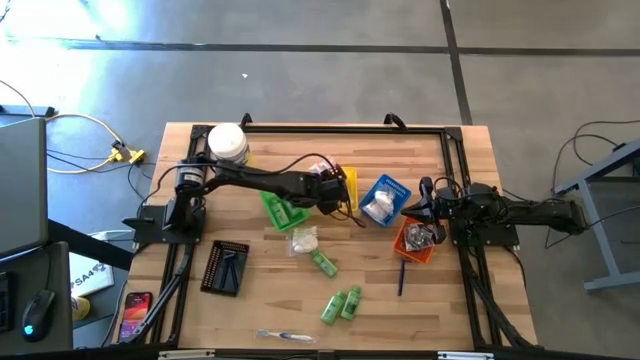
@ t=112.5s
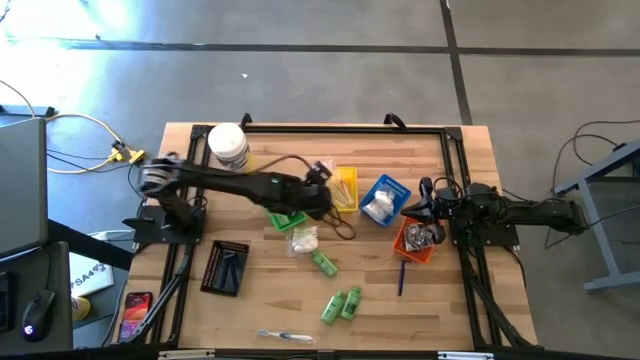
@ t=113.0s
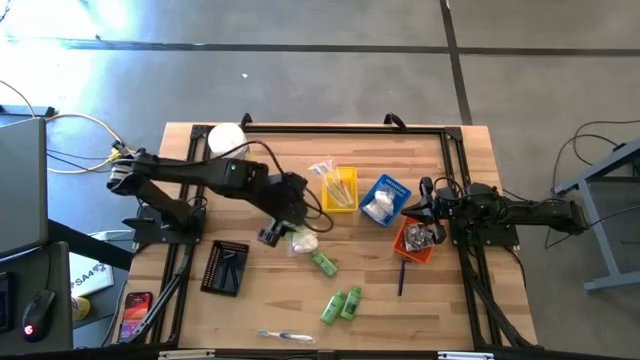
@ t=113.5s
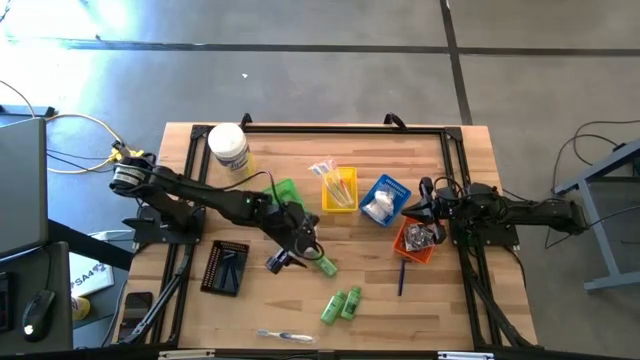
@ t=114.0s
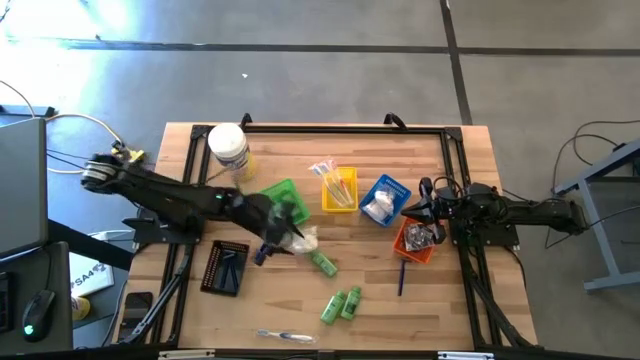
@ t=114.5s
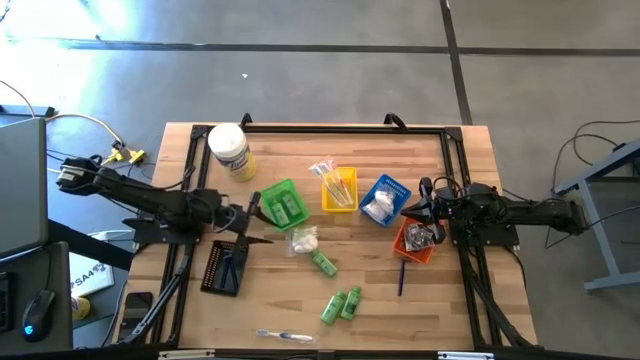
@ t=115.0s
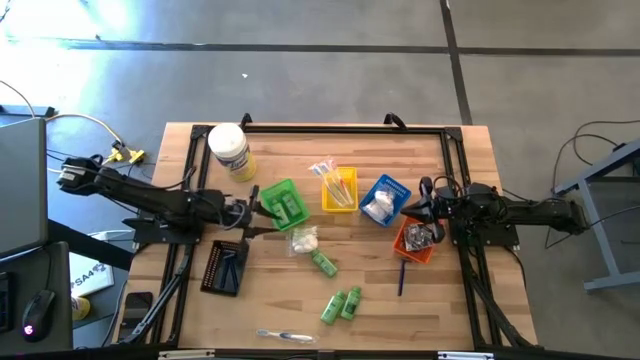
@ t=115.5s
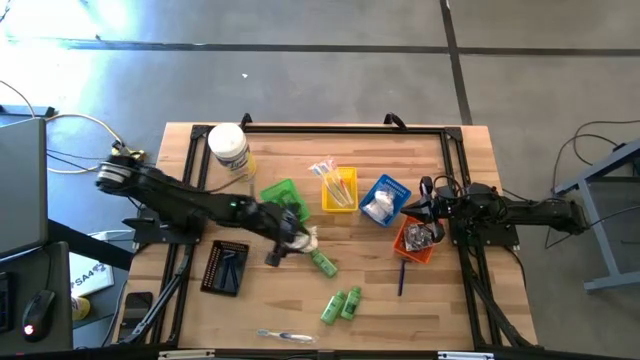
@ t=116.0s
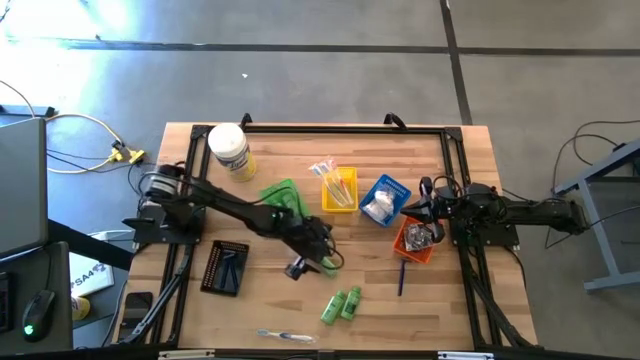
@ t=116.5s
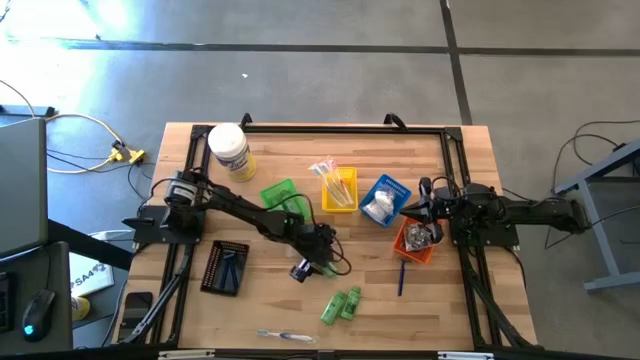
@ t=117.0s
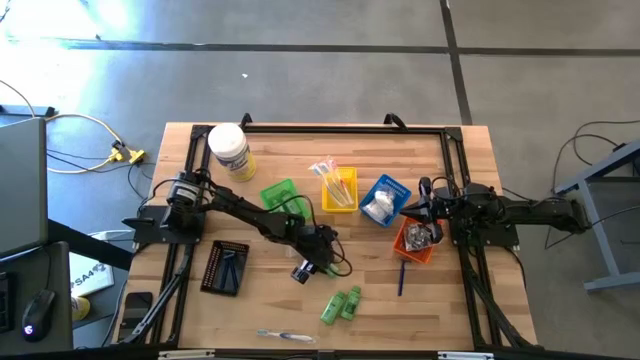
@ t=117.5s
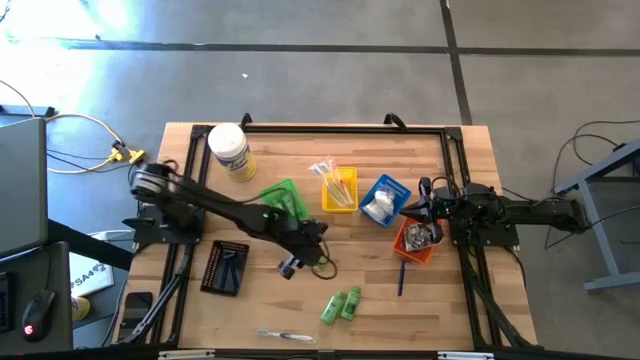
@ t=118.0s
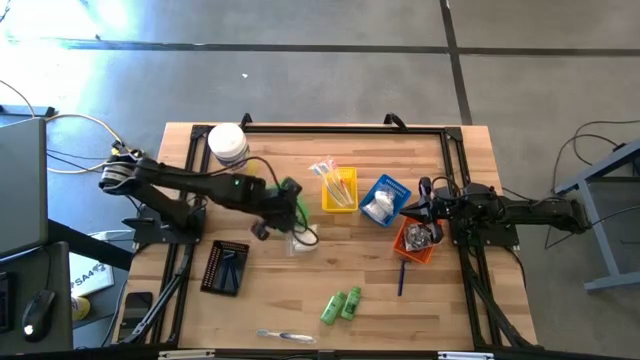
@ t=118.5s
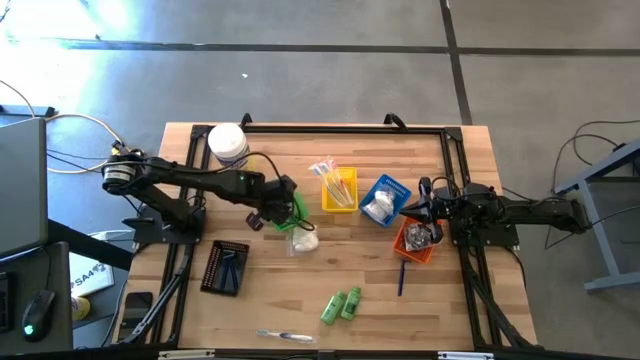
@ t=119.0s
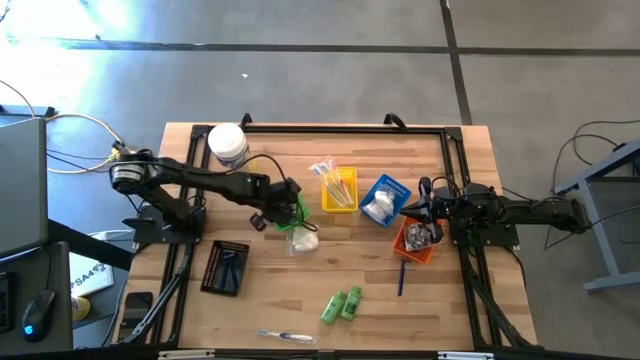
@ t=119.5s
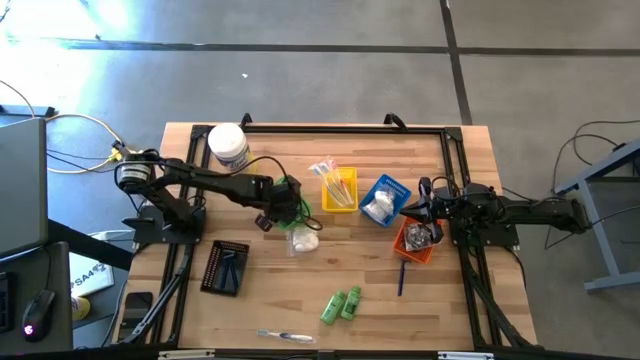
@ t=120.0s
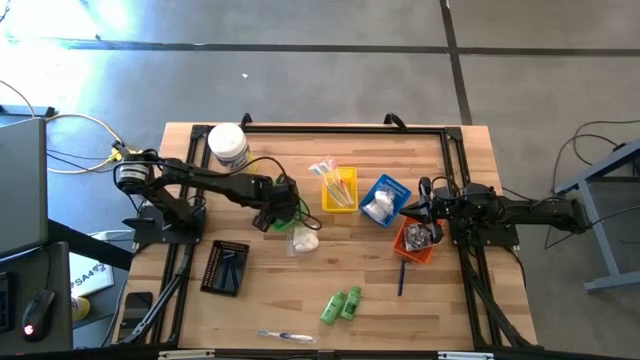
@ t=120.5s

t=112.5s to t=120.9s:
Task: Pick & Place Travel size toiletries
Put the top left shampoo into the green bin

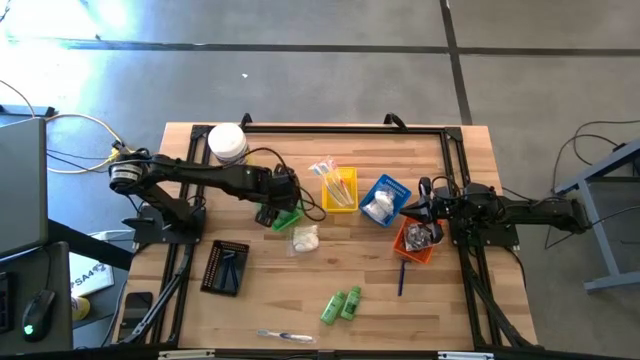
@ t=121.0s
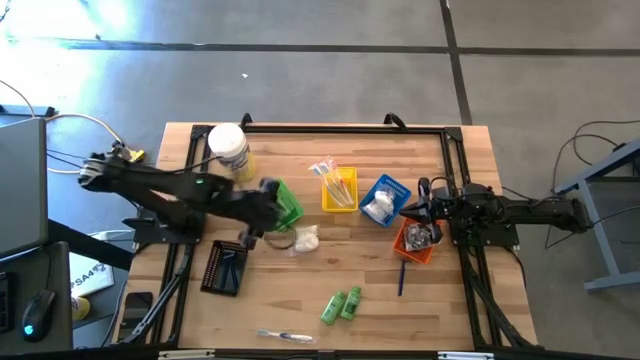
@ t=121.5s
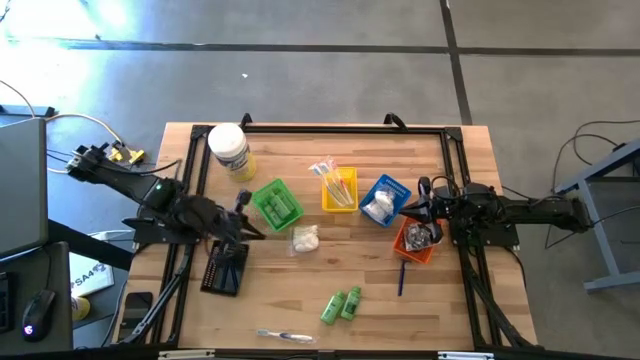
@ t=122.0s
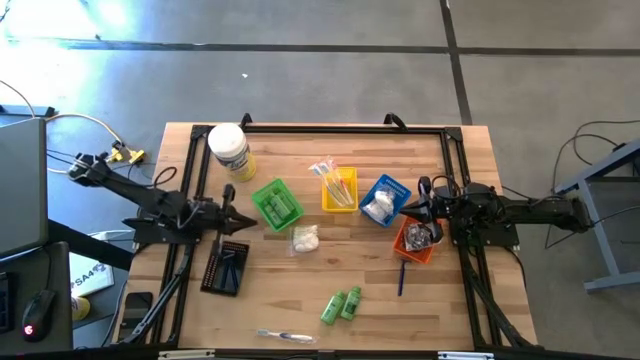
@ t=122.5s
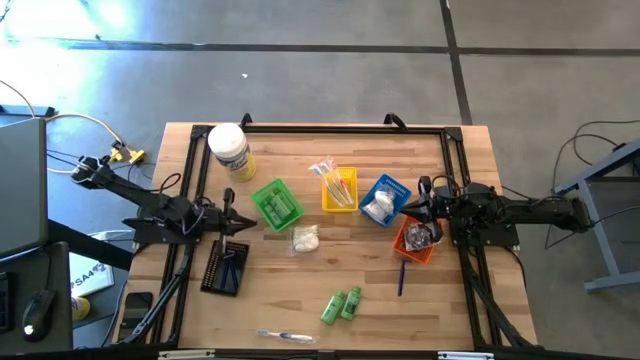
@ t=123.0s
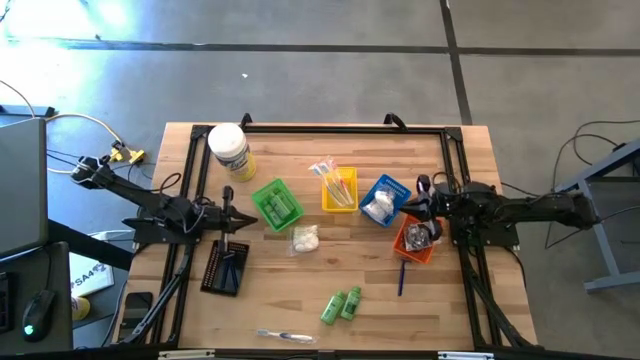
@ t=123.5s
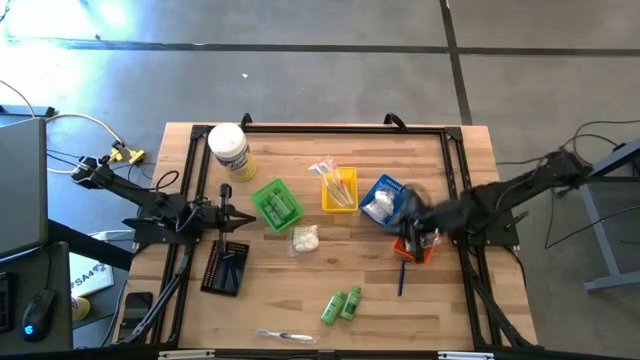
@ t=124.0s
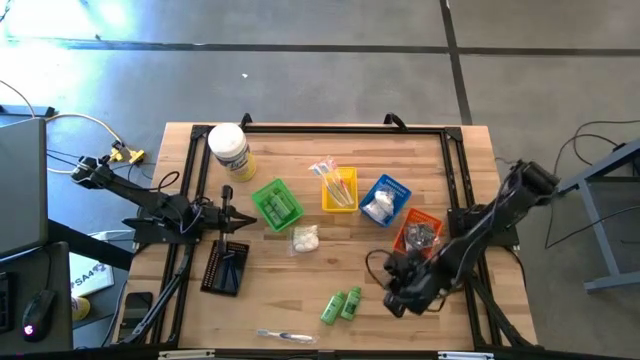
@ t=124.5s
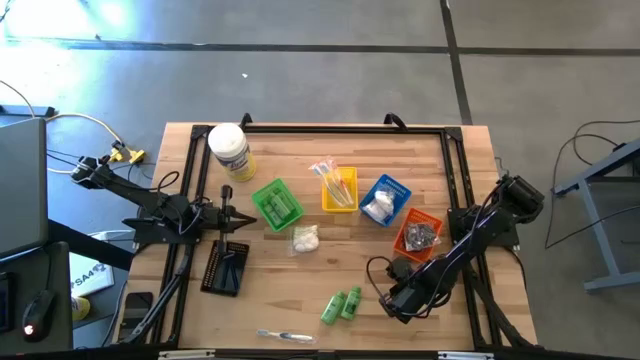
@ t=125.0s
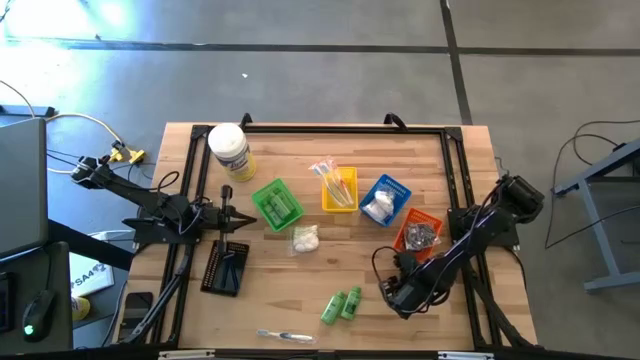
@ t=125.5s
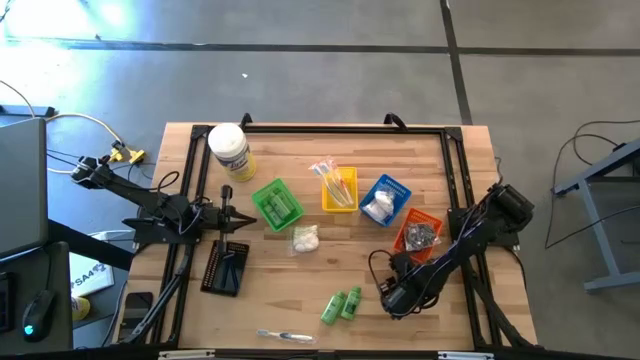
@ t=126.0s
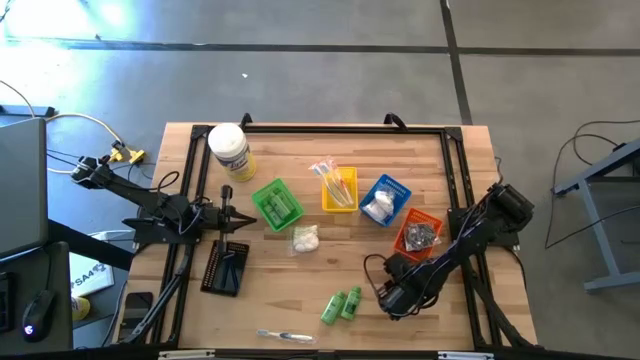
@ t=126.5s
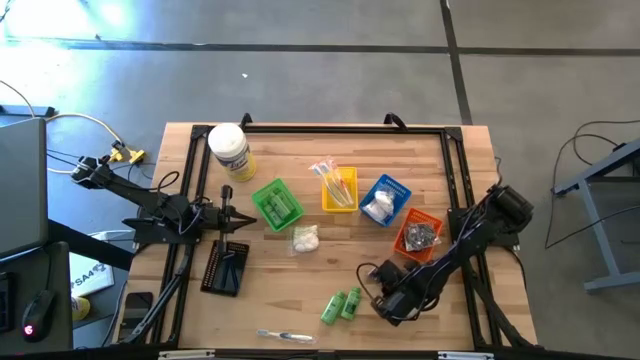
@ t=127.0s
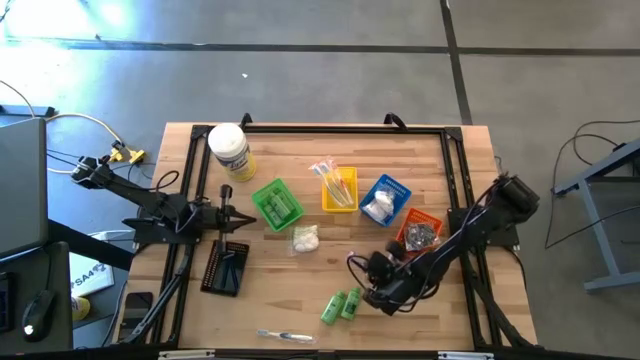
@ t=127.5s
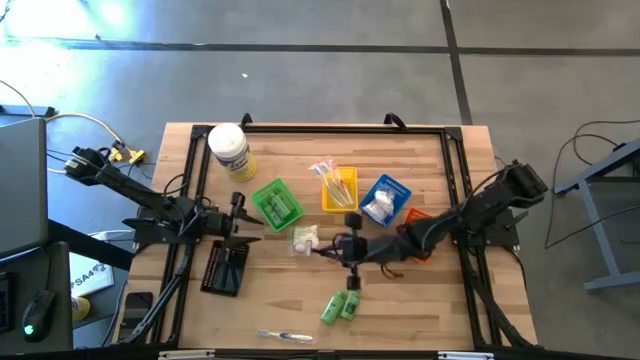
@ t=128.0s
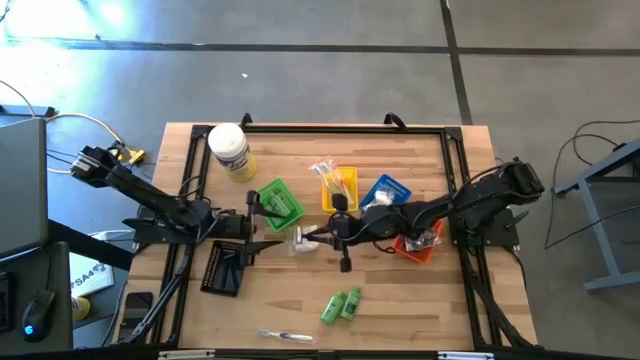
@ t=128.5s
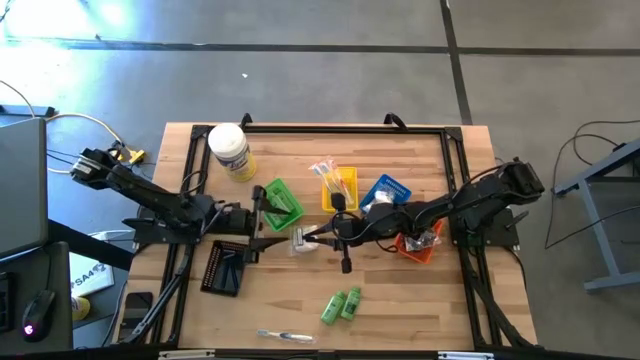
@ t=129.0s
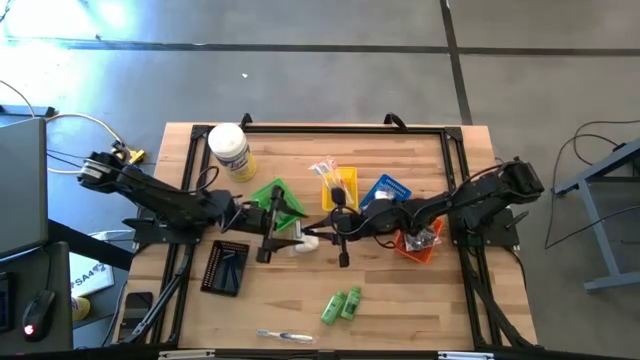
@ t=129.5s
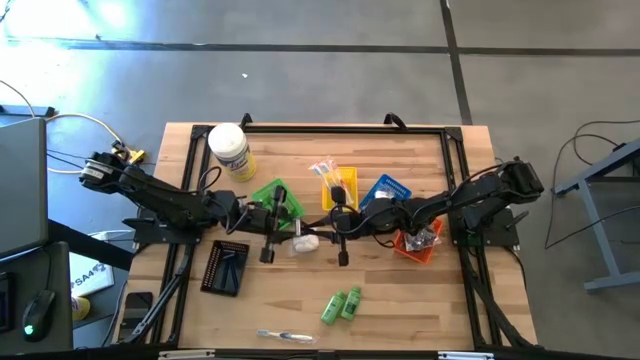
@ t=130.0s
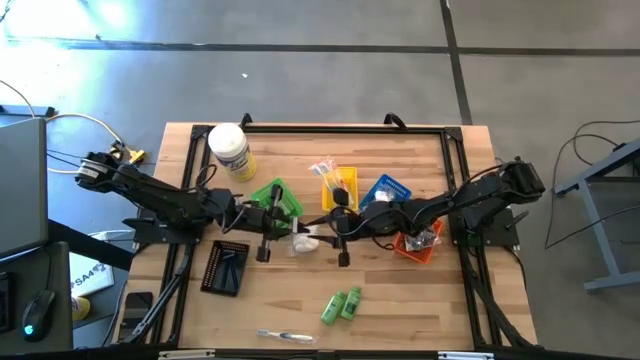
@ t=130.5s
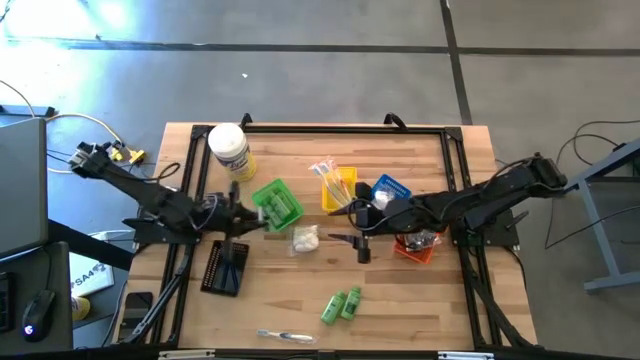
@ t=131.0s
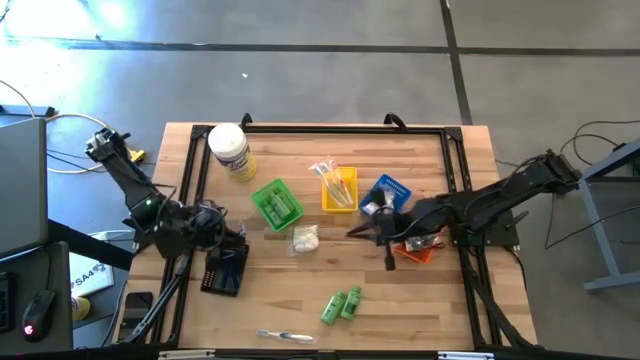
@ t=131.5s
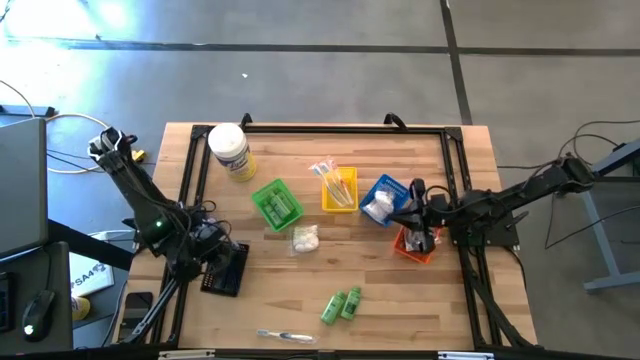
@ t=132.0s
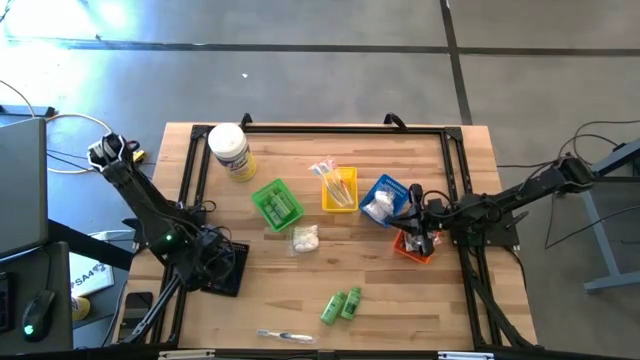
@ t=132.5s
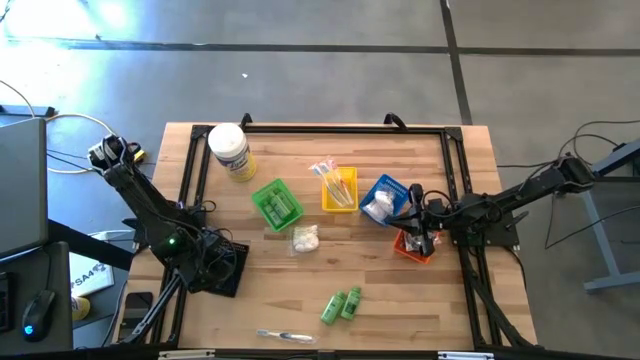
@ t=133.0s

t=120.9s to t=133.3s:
Put the razor into the black bin
